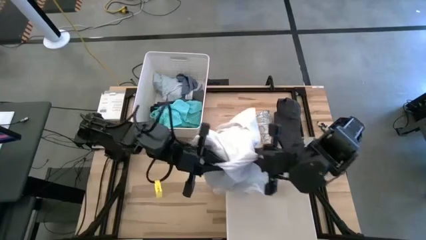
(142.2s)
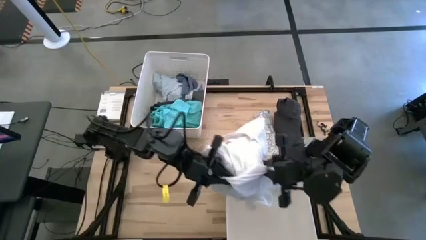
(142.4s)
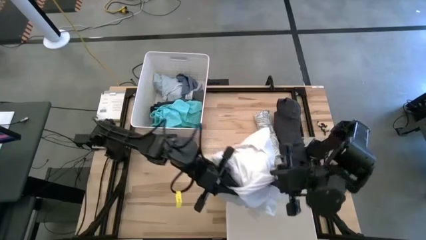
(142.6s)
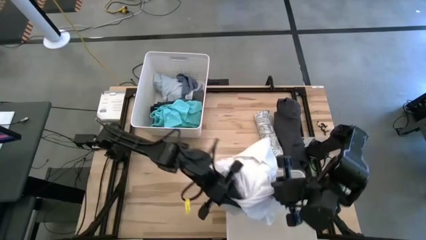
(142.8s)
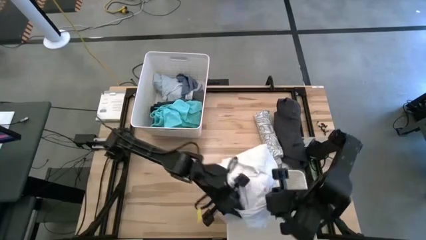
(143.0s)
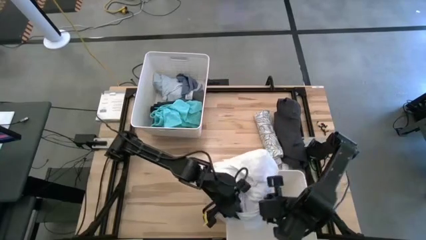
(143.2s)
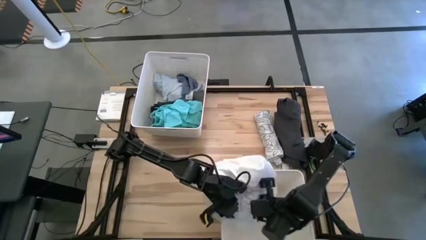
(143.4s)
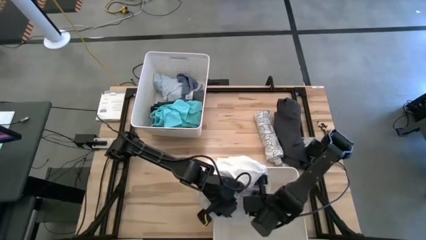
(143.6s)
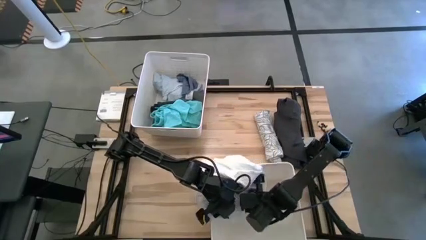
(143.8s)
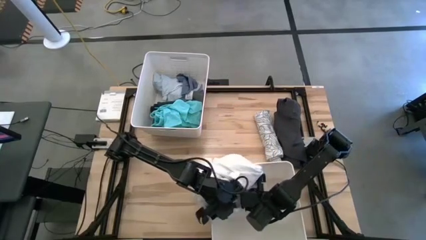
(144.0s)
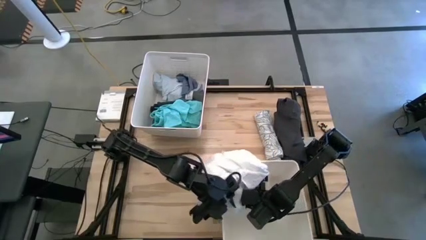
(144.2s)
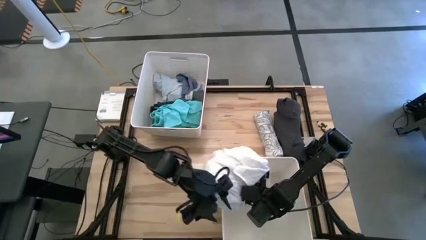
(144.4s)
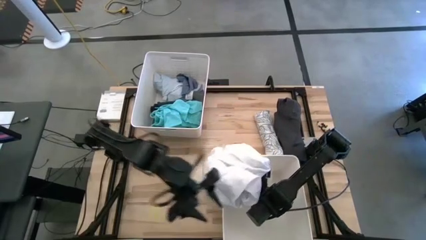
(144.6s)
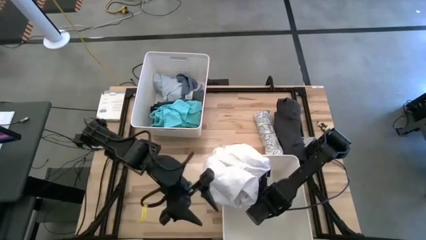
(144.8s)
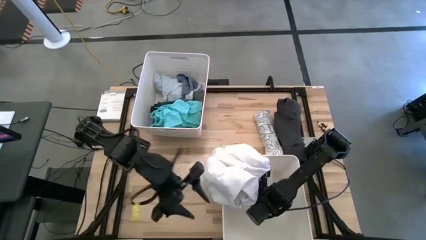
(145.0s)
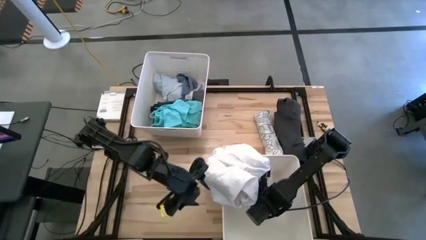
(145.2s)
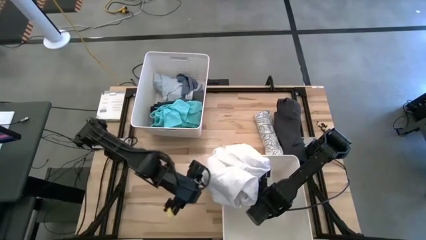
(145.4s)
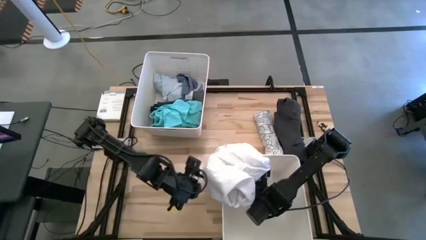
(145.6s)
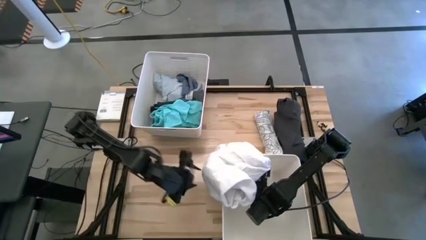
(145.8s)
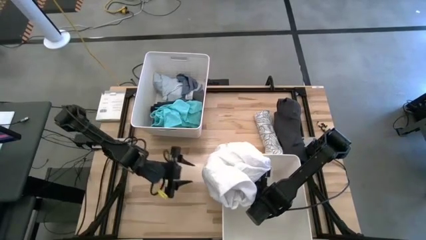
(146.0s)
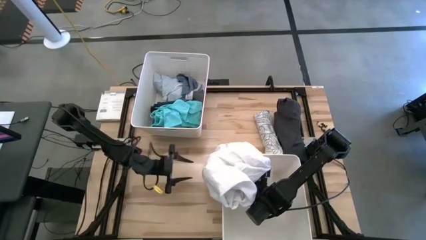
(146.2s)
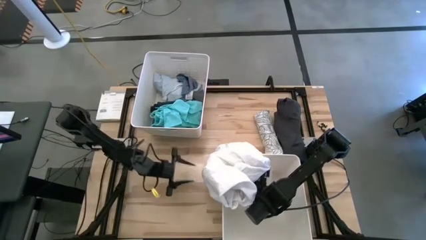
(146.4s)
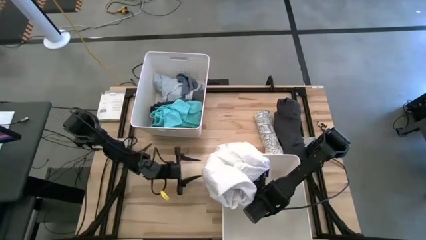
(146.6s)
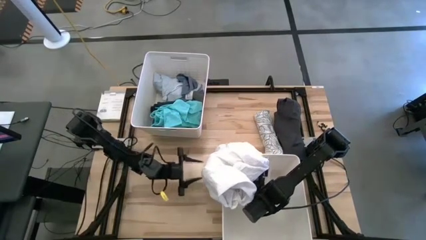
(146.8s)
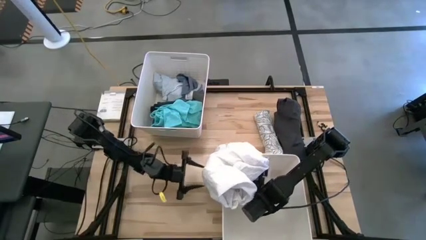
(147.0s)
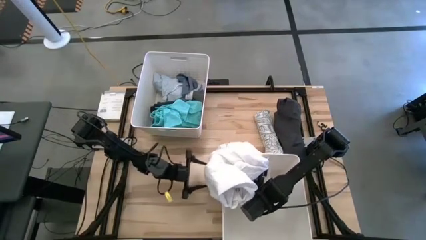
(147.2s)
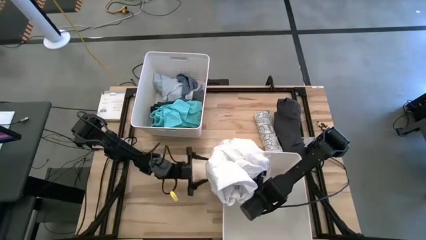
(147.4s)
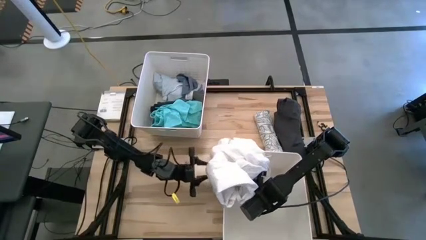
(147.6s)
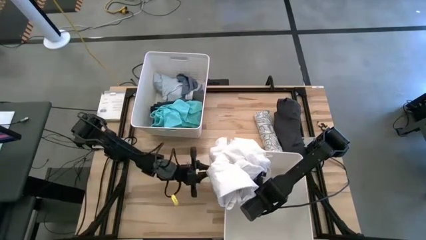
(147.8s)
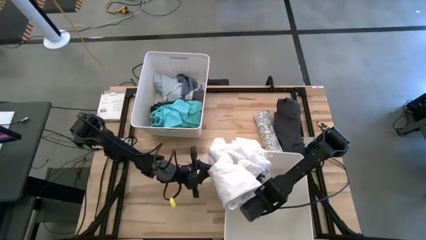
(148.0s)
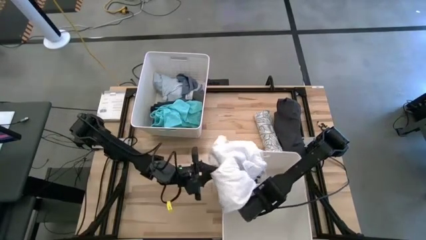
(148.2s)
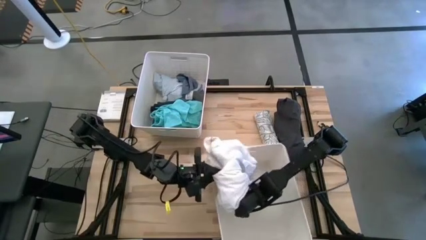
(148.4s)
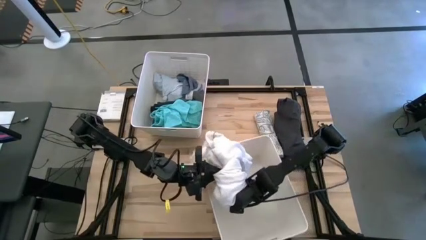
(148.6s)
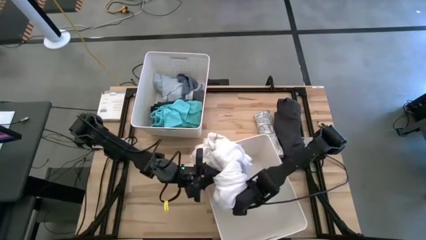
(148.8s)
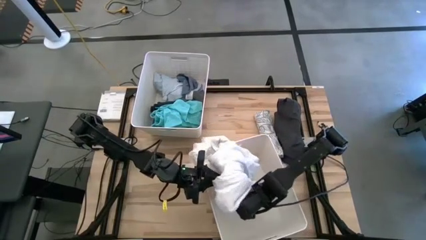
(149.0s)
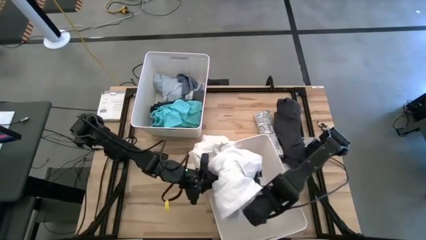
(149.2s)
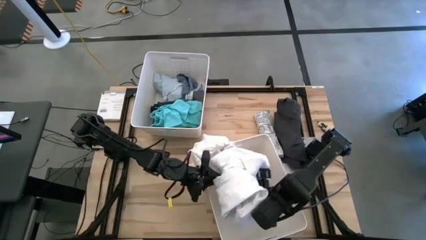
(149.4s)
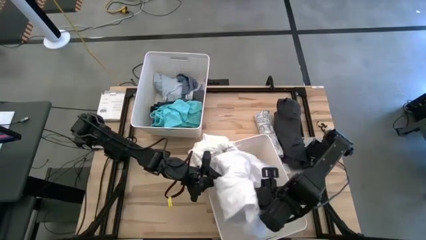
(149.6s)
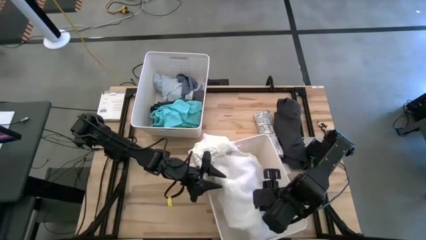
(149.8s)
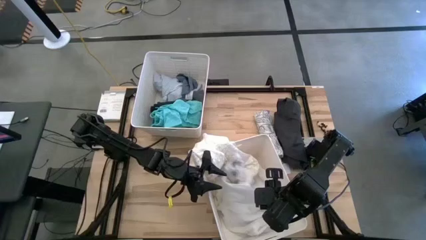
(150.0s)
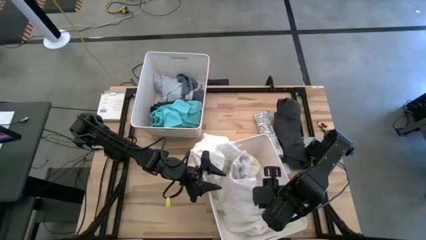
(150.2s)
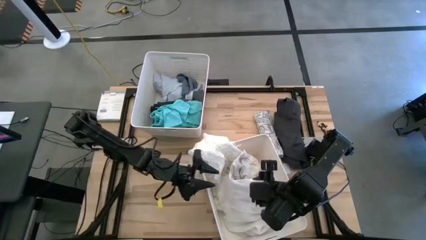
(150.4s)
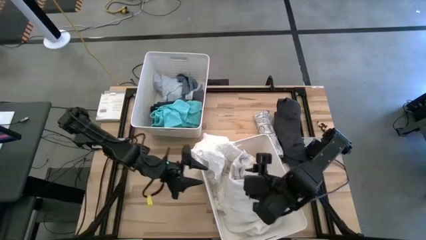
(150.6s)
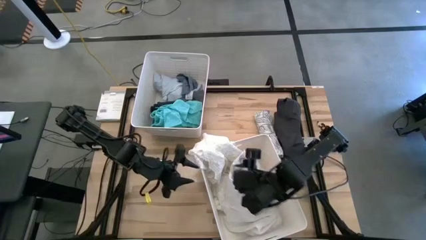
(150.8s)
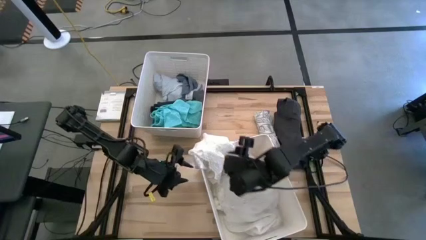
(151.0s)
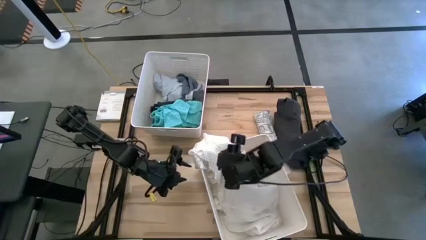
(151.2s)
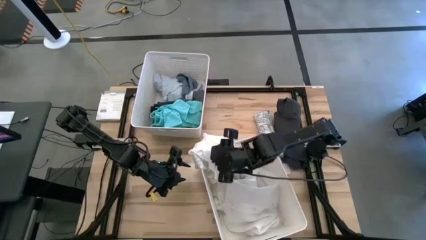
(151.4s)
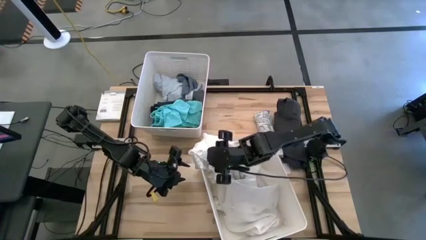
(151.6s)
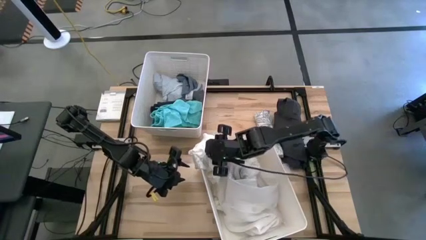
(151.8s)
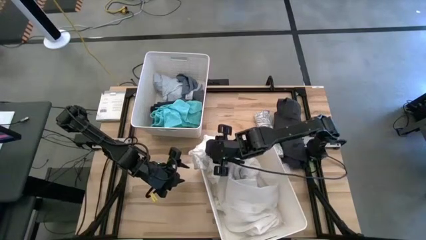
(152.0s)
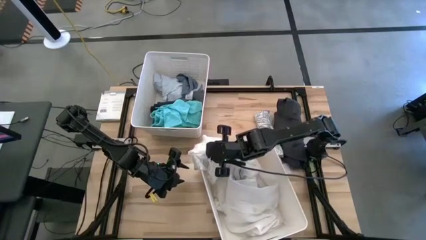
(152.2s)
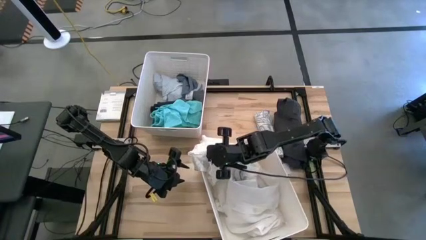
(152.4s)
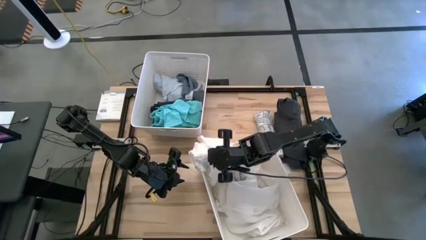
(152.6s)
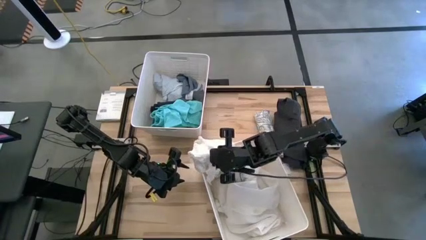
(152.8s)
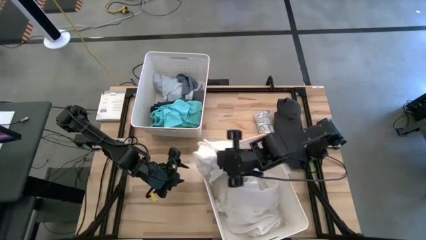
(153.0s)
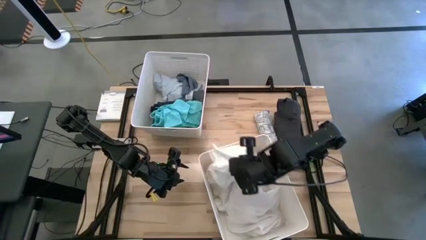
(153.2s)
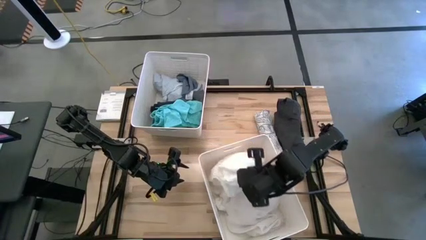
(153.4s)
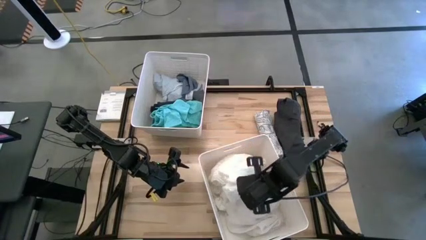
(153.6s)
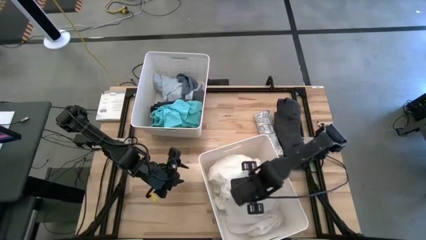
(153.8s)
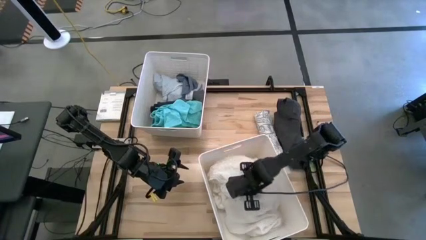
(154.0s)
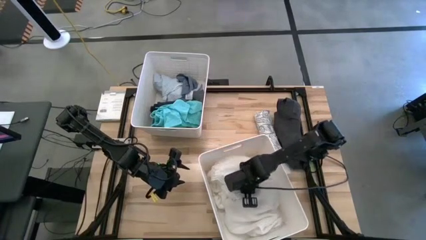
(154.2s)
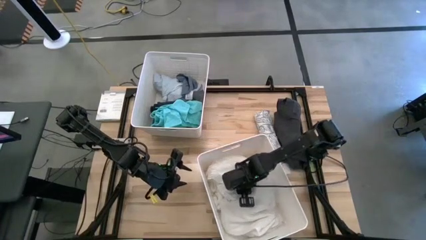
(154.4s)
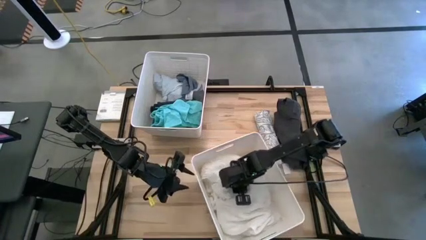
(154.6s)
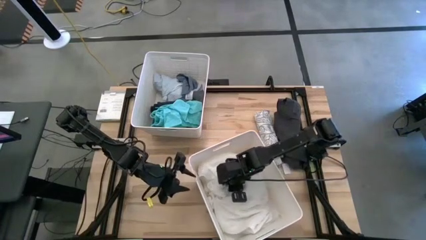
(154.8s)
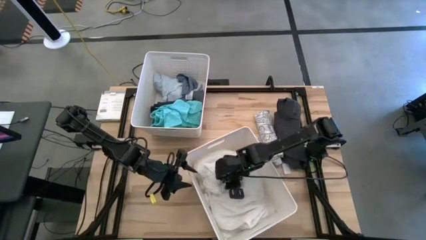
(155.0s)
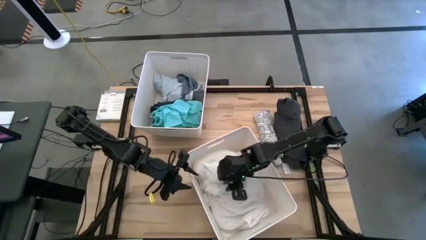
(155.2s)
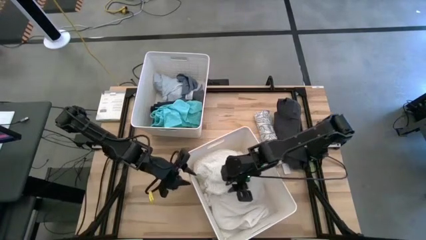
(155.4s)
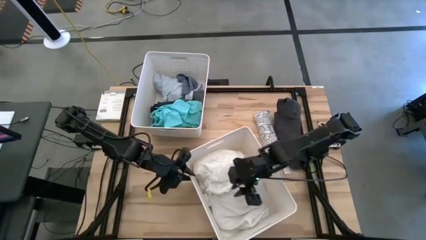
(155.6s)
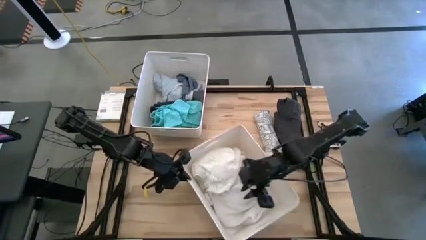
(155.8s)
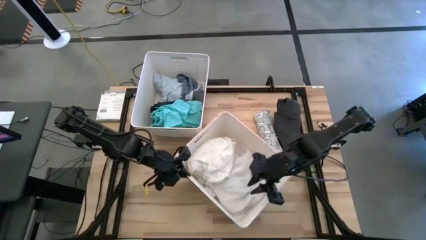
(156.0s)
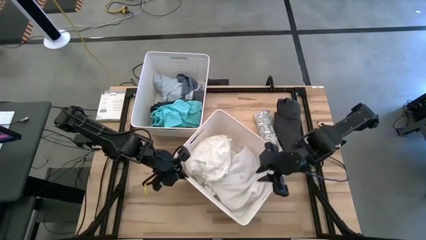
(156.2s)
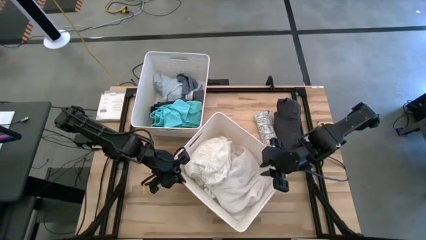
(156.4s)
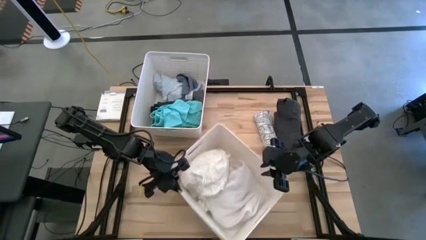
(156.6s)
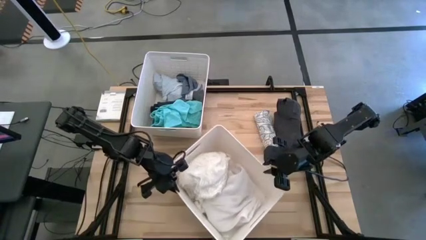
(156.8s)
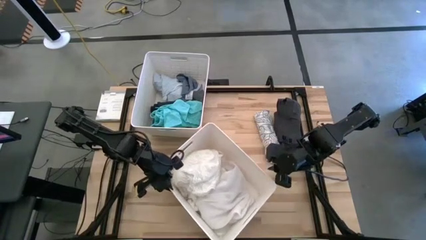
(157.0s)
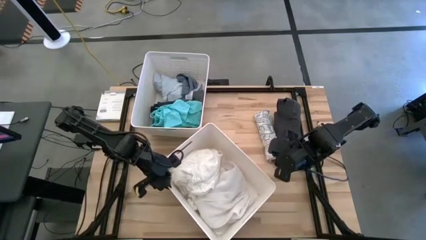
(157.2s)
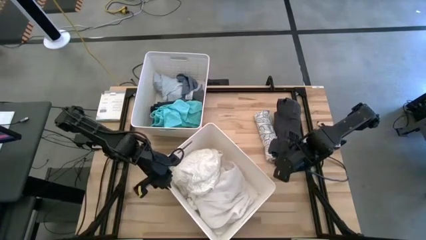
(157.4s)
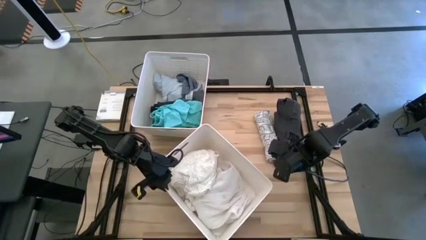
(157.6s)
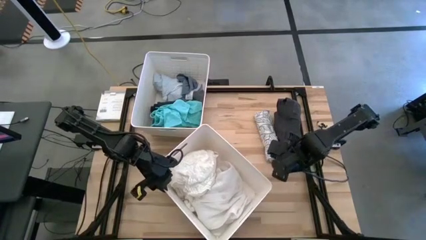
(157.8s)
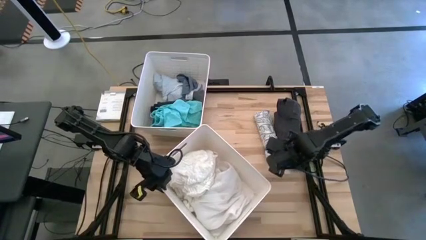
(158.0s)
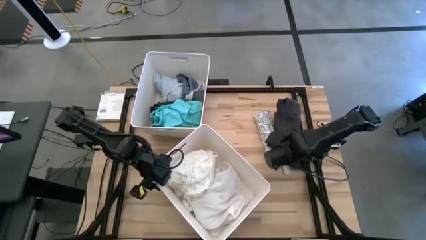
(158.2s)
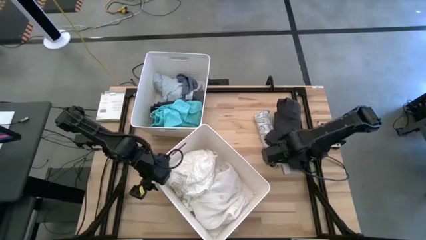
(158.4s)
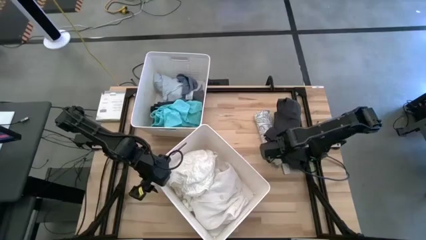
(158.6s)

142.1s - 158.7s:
Task: Sort clothes
Put the white dress into the bottom white laundry bin
